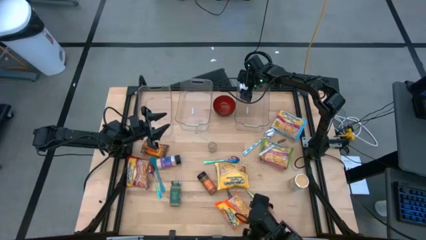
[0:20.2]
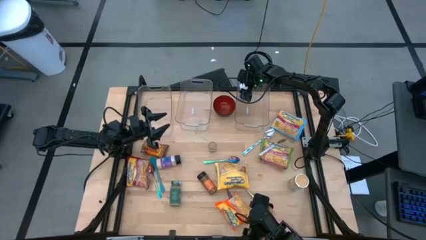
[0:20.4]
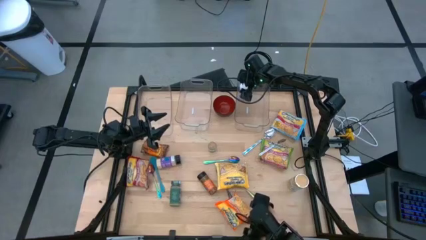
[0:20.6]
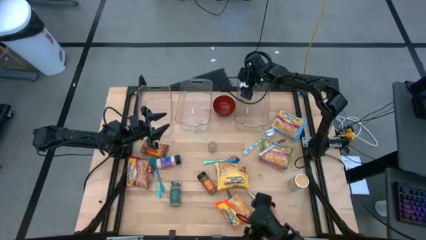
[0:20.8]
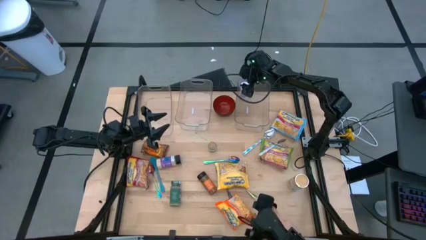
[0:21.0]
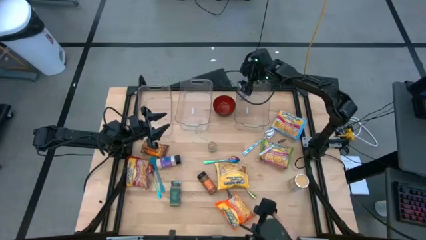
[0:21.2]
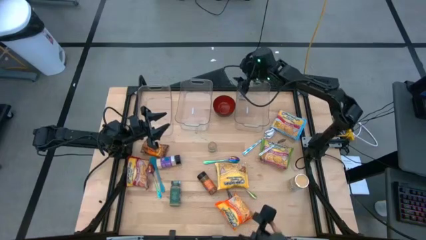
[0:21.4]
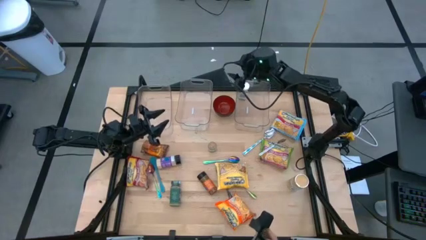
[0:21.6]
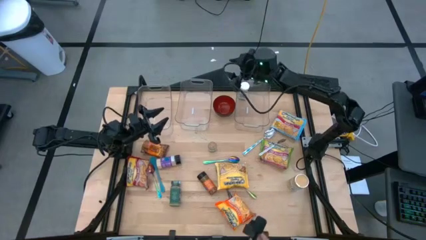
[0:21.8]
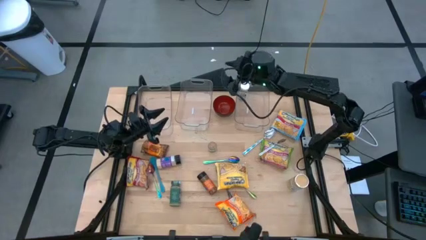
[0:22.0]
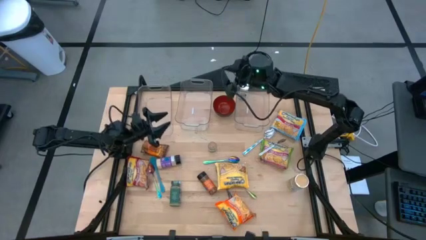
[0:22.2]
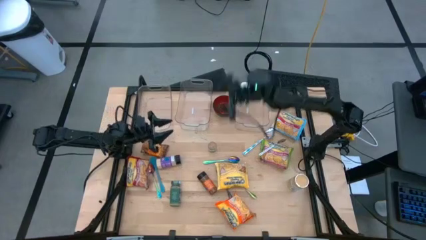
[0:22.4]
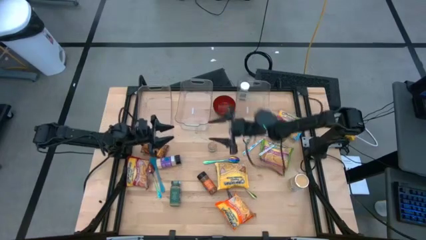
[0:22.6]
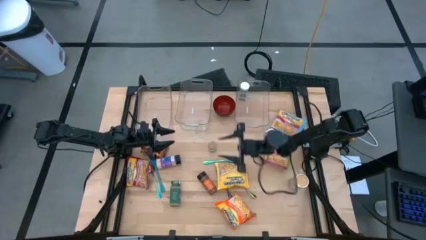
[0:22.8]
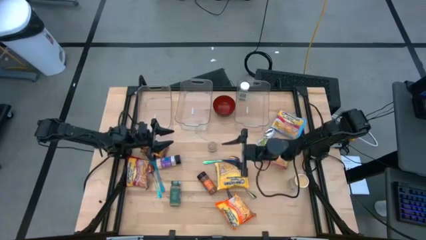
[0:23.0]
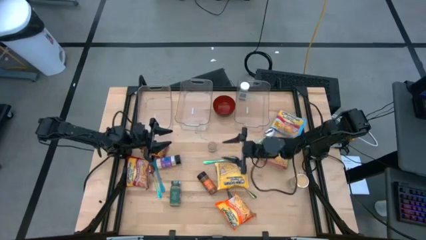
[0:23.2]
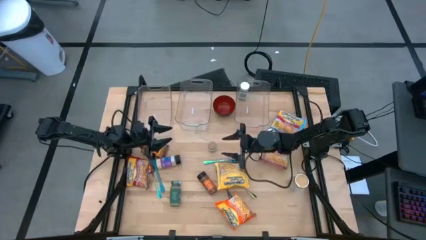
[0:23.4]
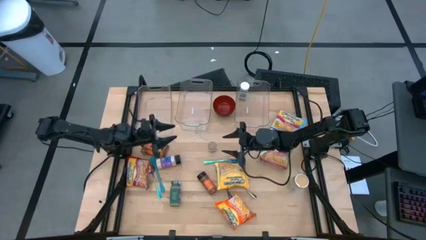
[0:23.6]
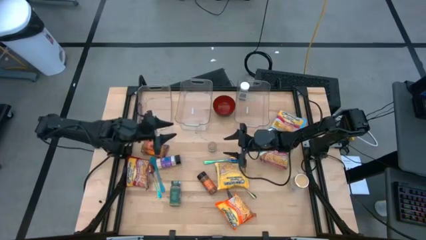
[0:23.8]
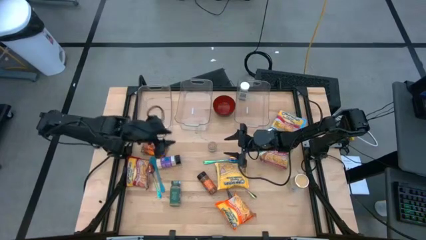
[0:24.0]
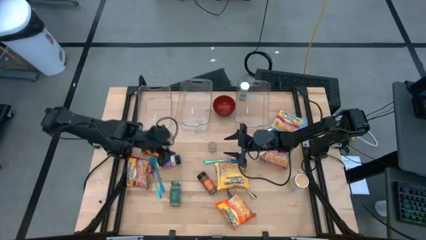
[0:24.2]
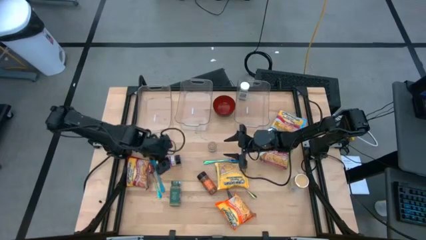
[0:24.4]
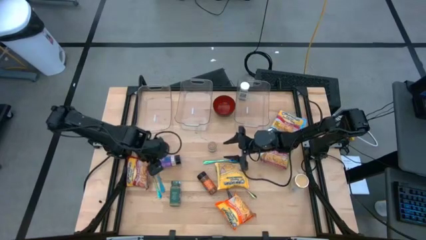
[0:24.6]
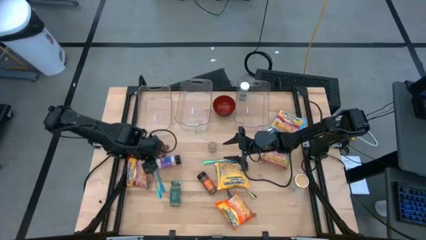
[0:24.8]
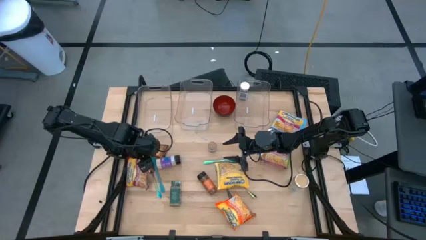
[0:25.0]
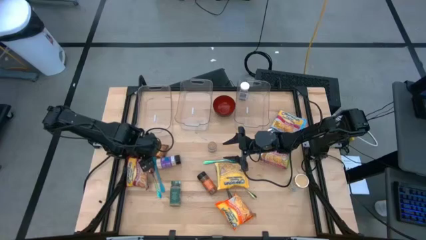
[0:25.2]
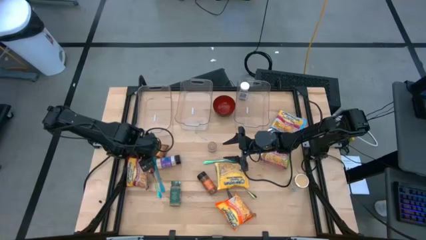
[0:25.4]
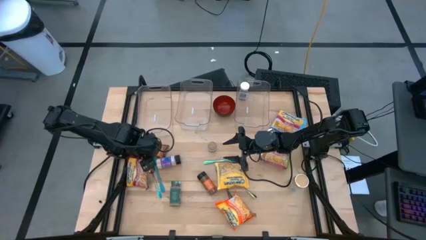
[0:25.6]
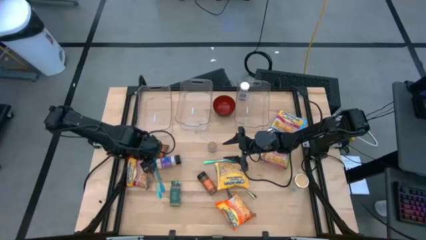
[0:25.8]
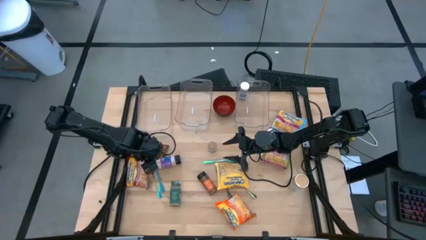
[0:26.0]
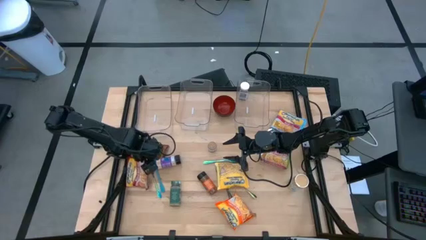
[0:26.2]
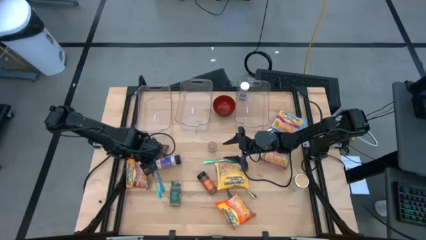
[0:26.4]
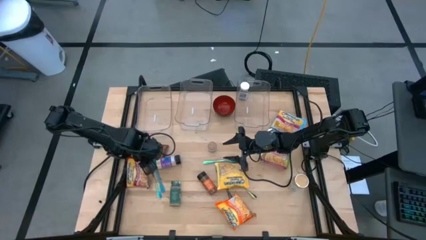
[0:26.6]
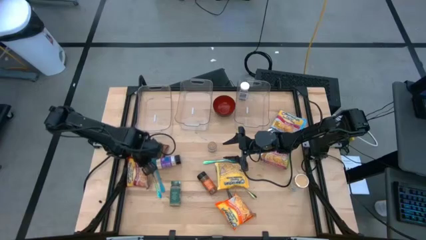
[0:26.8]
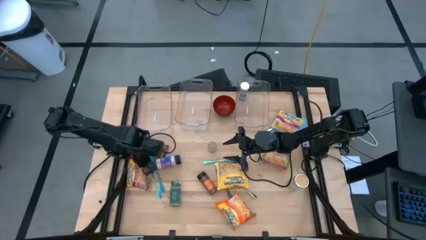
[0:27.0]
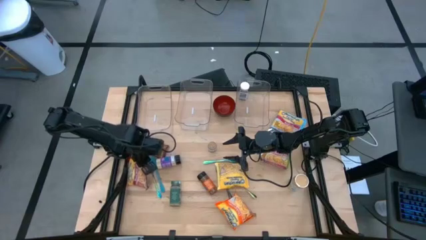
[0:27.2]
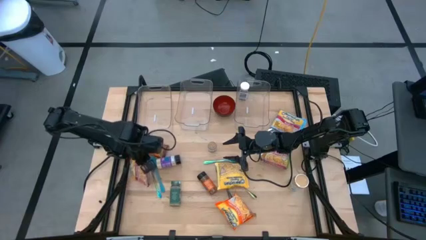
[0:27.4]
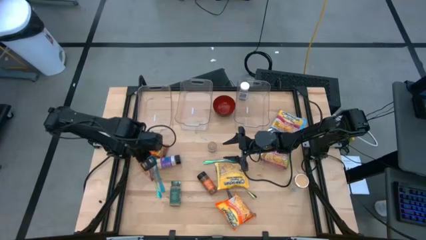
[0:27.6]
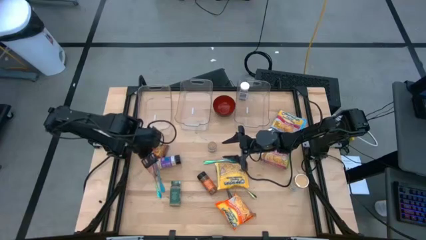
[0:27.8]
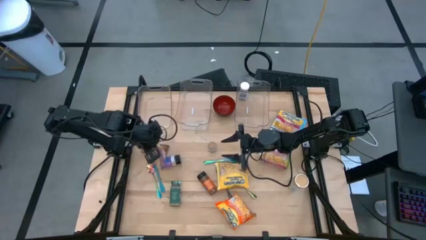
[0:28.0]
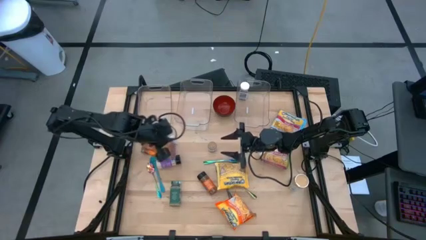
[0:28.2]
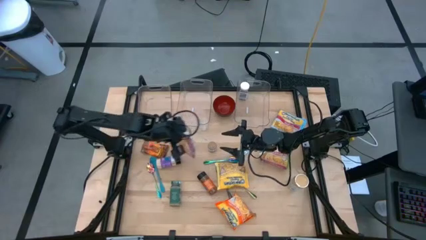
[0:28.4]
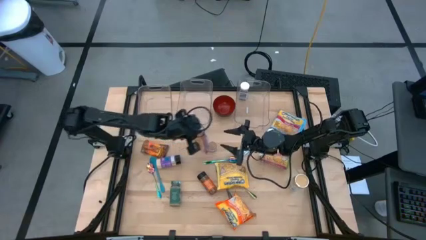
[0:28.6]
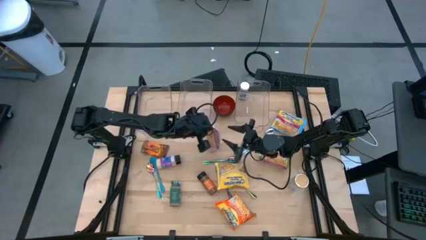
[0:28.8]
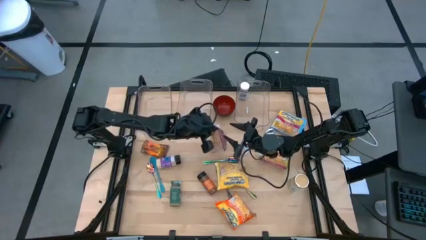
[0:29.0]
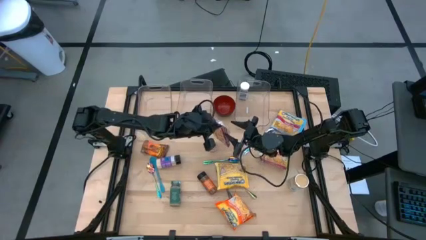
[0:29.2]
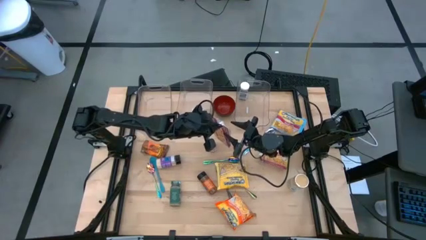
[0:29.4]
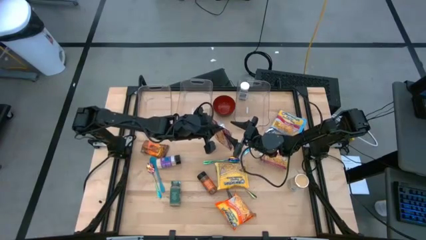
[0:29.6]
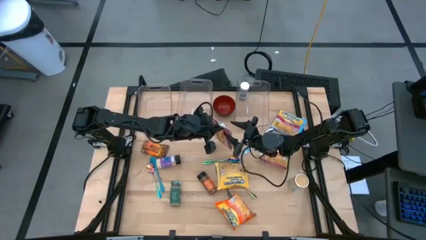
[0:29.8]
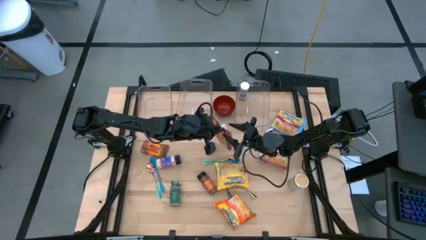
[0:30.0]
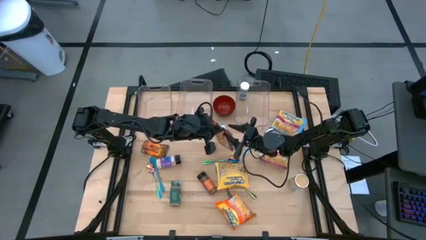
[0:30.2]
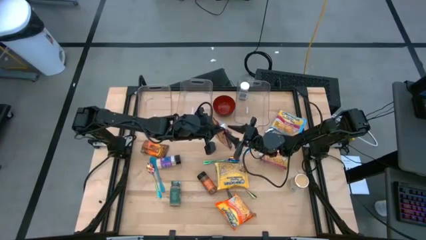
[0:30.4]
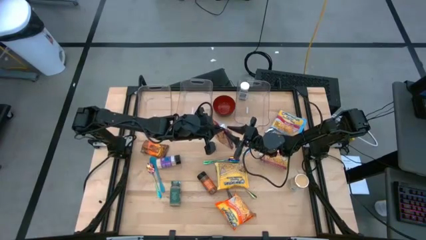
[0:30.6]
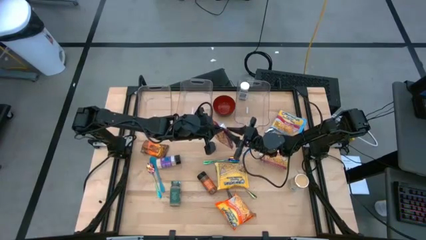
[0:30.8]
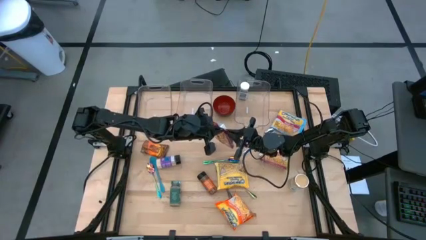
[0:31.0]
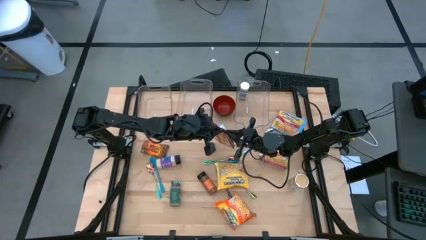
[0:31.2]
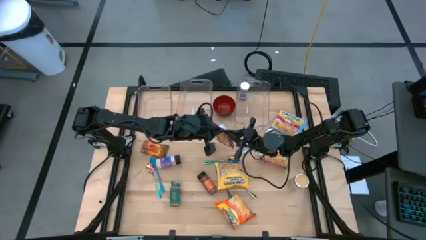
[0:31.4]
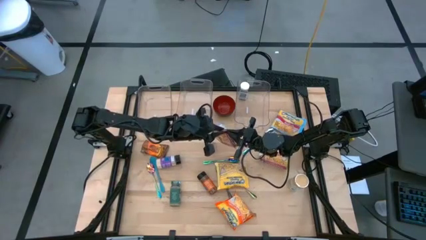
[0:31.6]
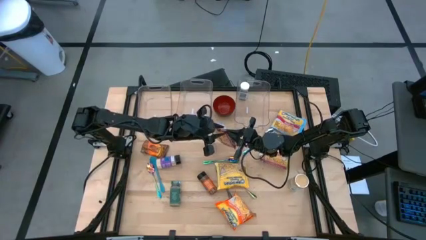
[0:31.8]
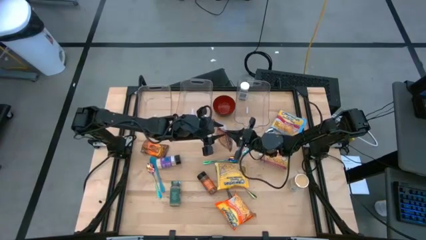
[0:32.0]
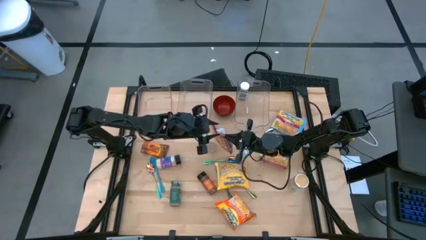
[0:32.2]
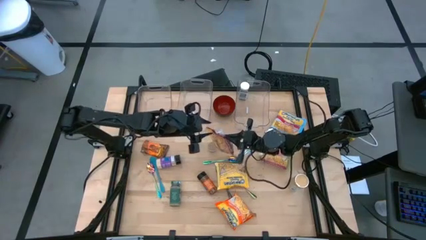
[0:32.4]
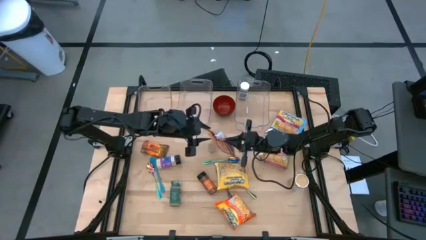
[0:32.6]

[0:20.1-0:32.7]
Task: Pick & Place Food Item
Put the red noodle pack into the middle transparent bin
